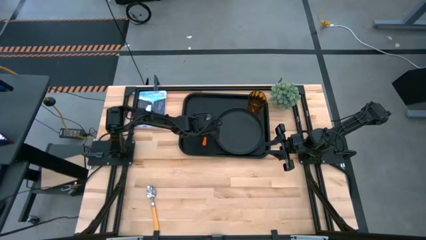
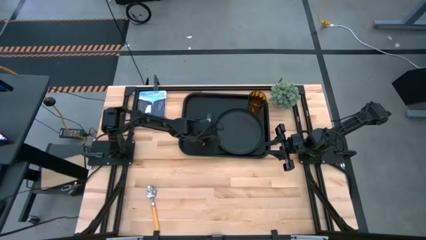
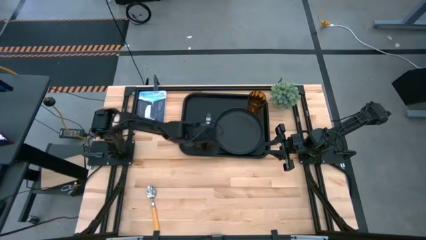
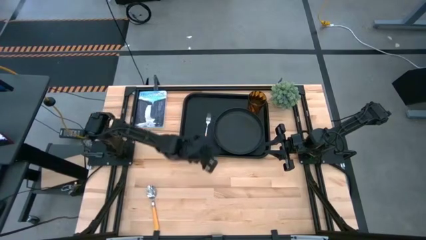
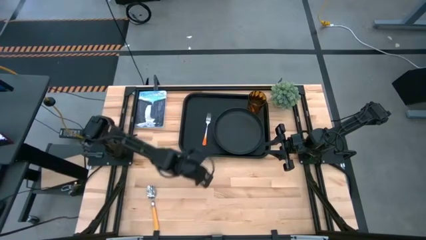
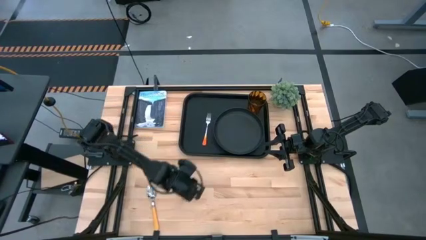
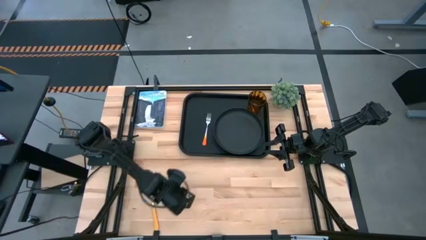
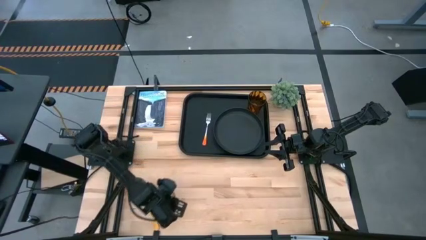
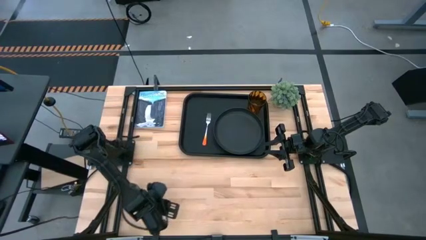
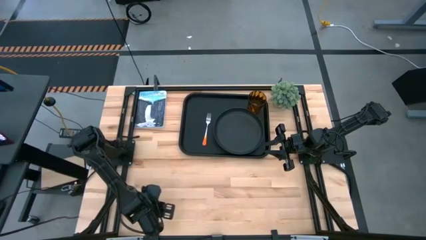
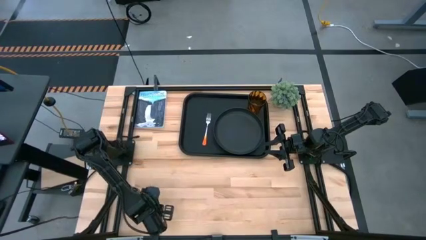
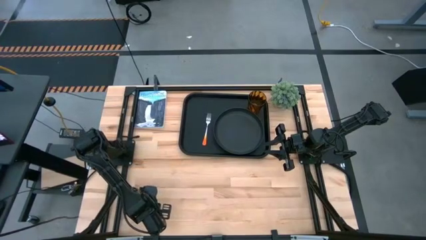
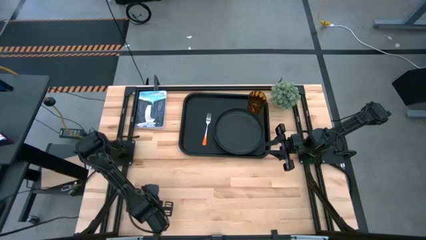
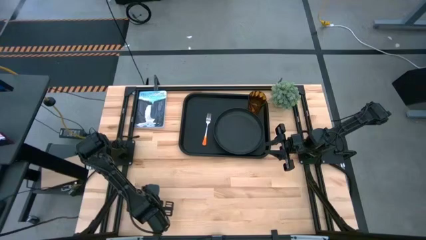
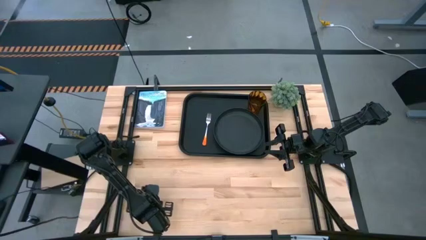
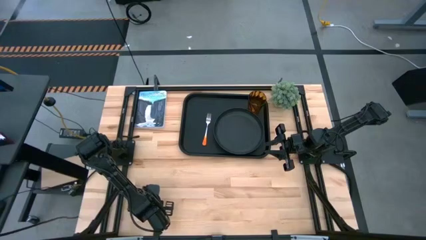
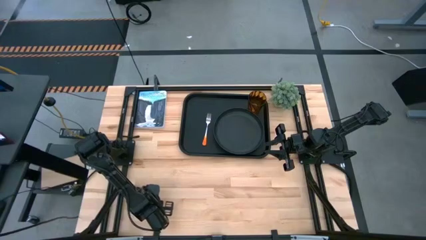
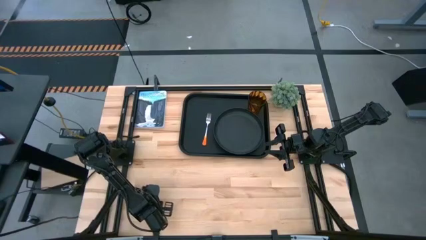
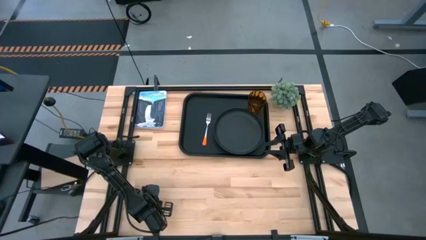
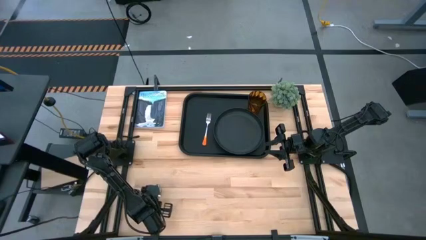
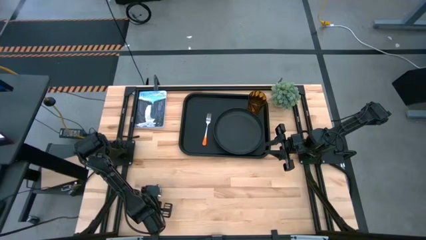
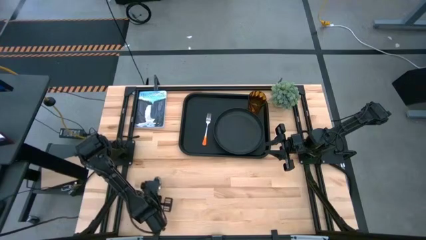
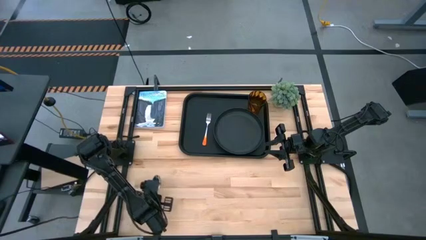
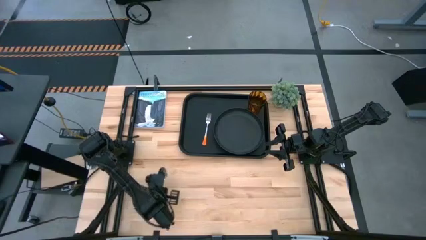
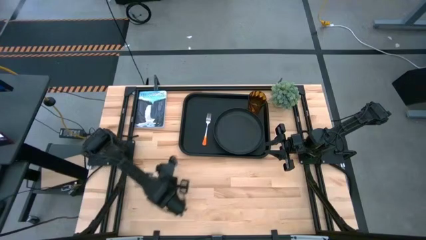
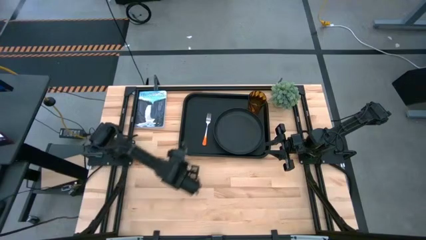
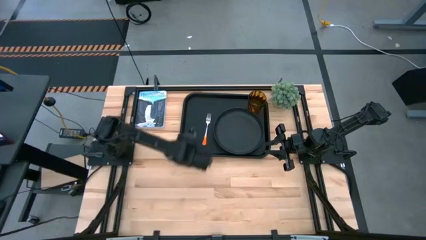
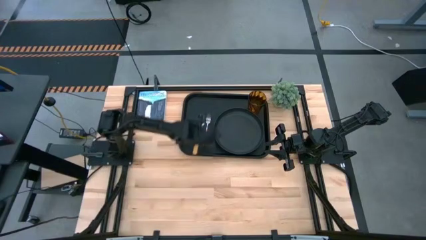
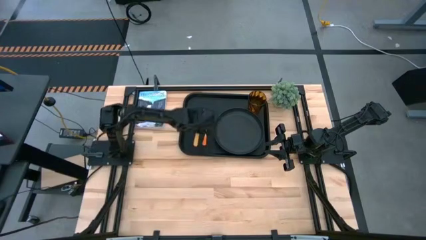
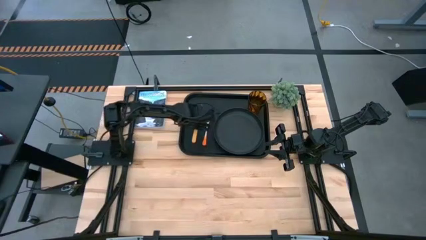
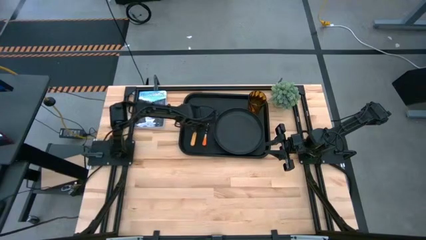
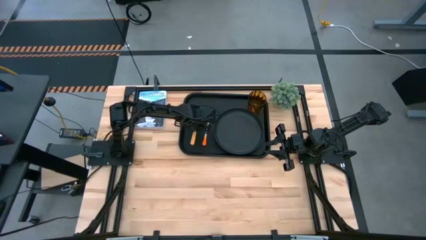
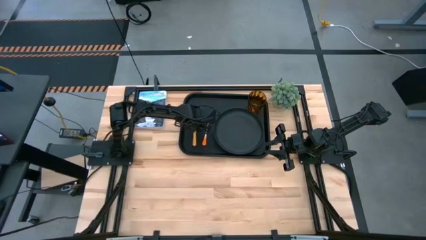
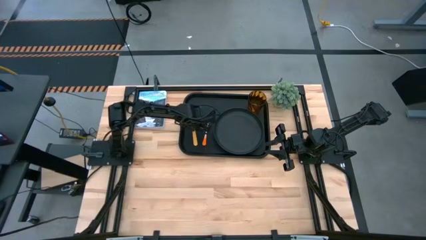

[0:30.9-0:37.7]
Task: Pick and place plate/cup/fork/spoon on tray
Put the spoon to the left of the fork on the black tray

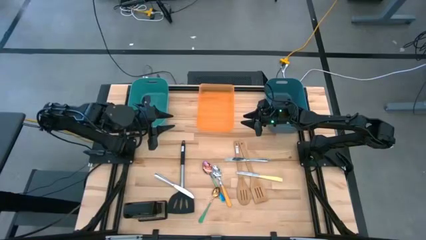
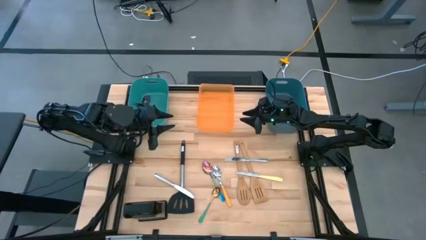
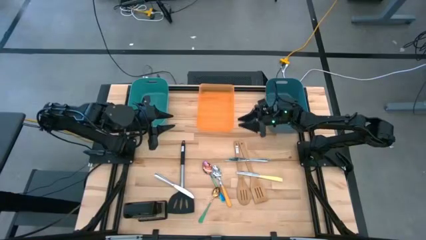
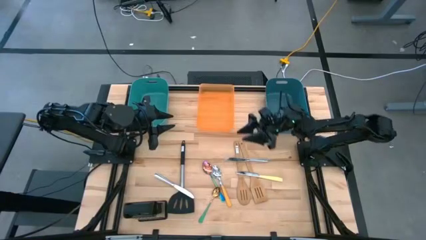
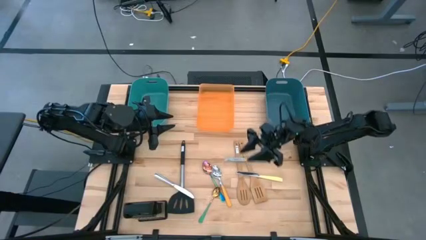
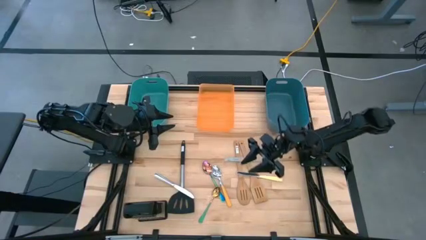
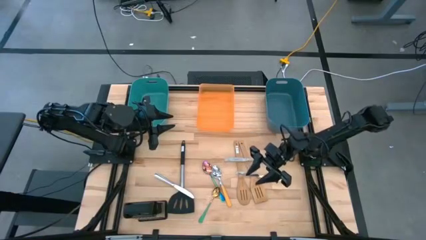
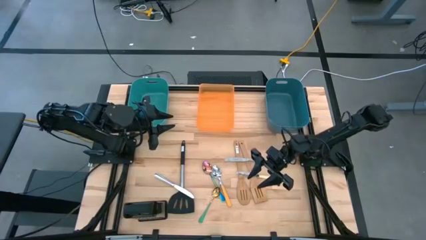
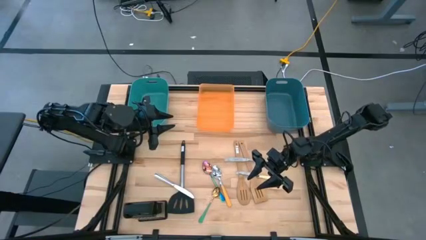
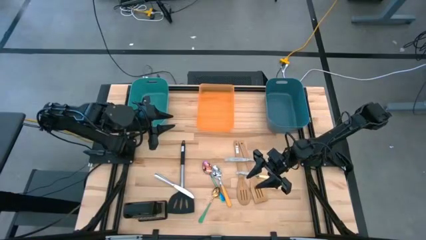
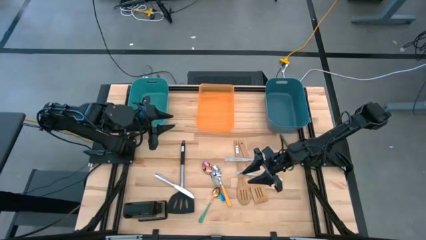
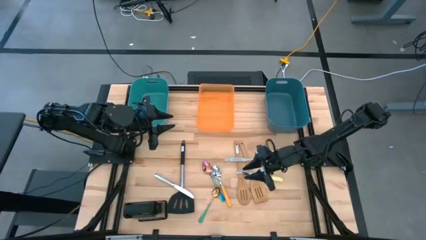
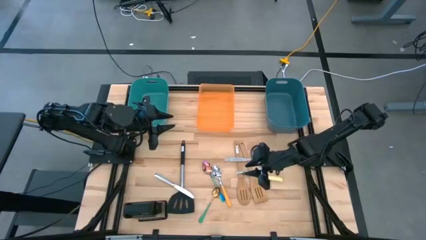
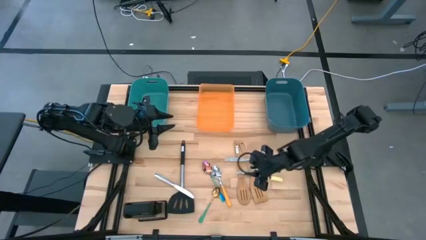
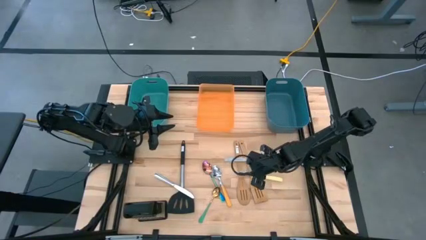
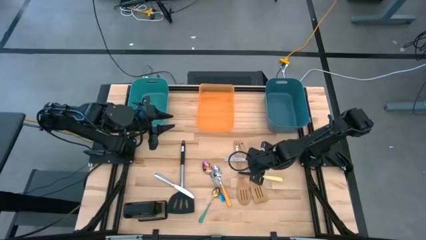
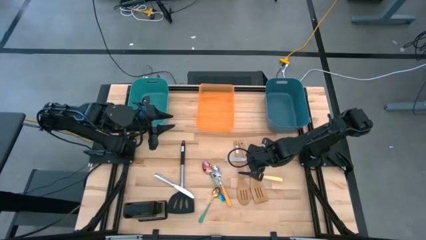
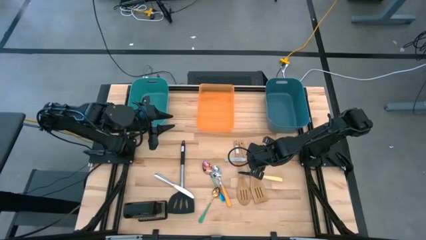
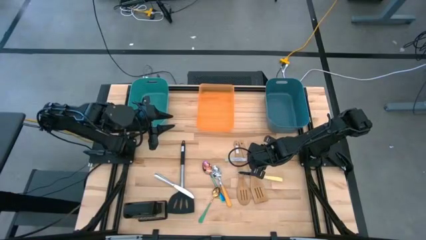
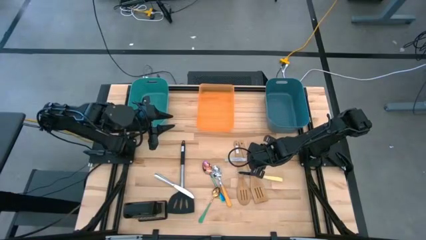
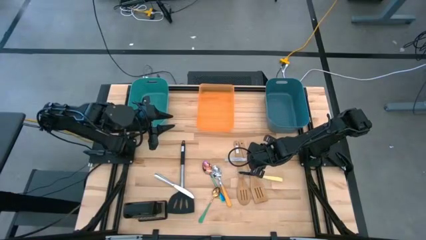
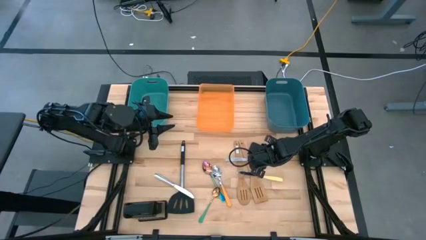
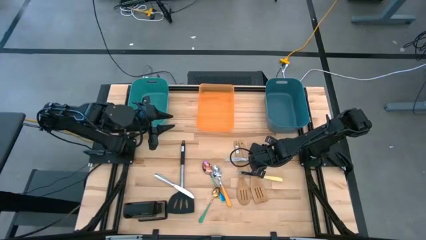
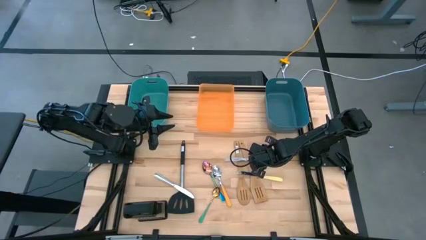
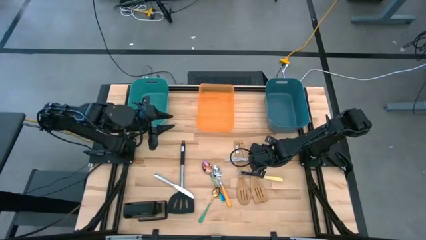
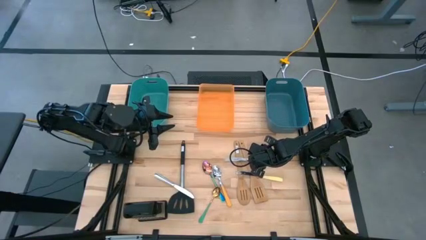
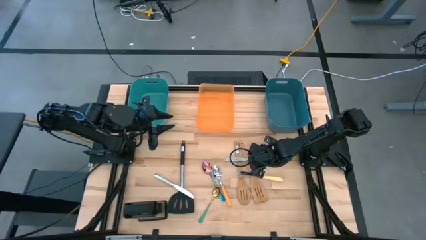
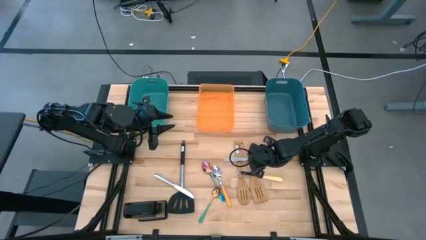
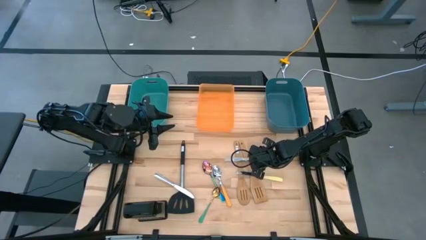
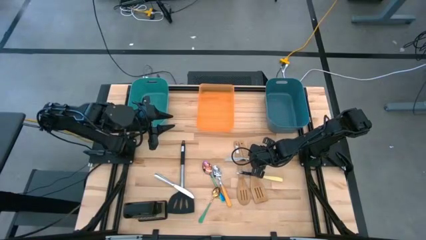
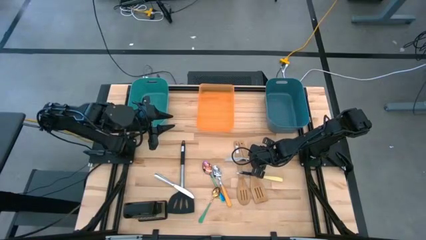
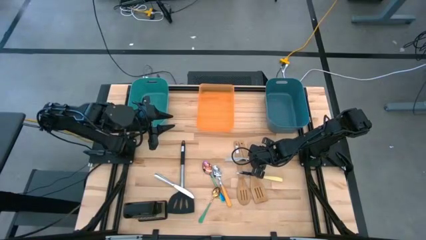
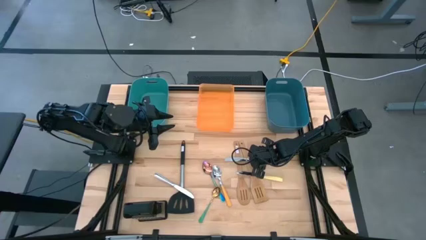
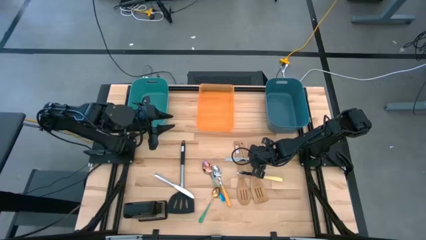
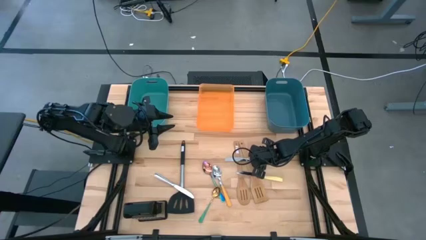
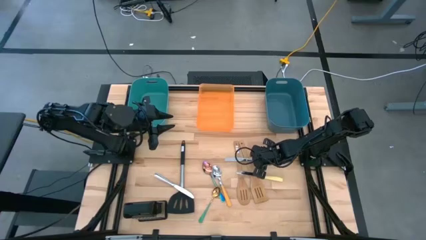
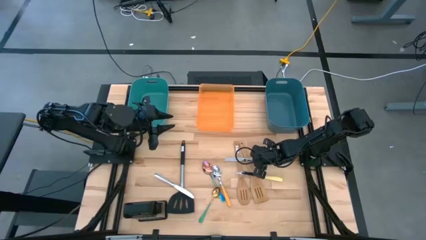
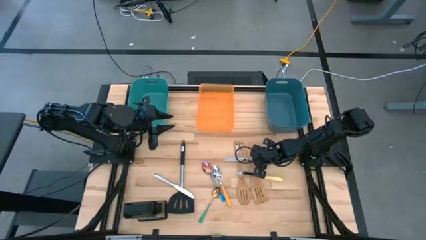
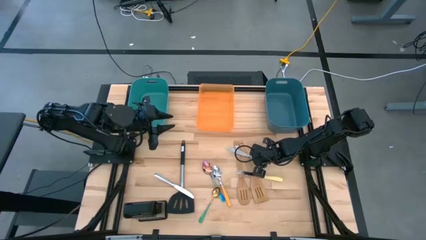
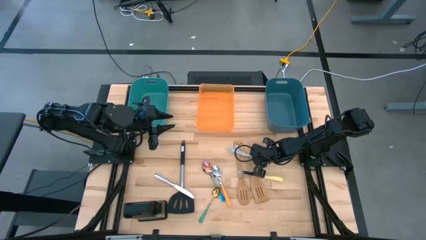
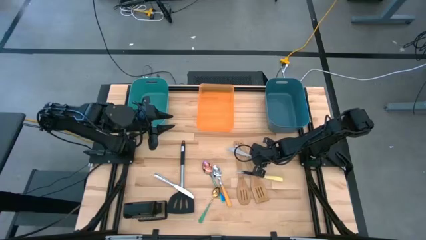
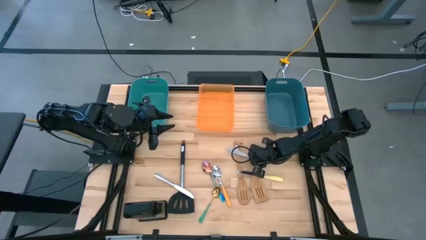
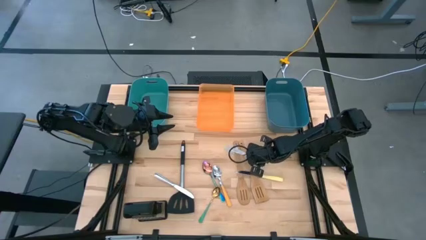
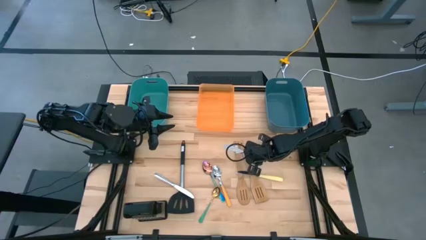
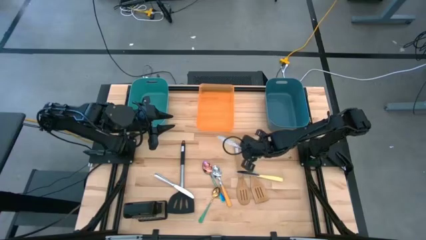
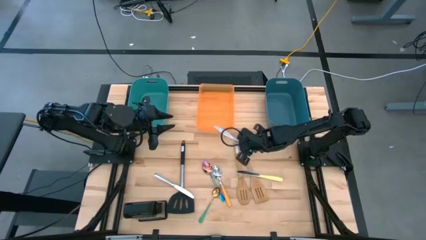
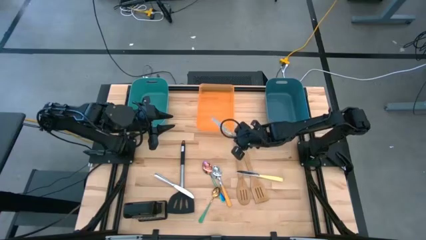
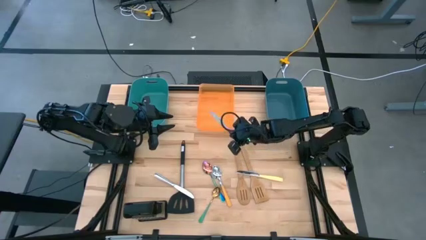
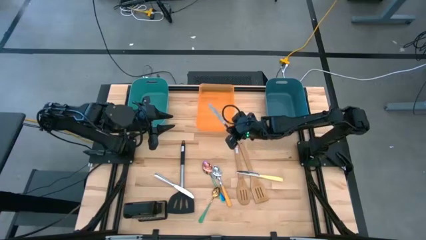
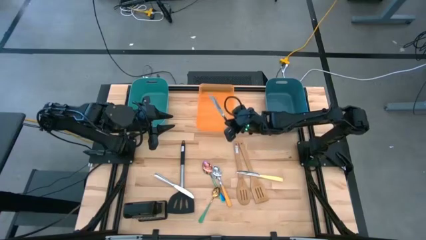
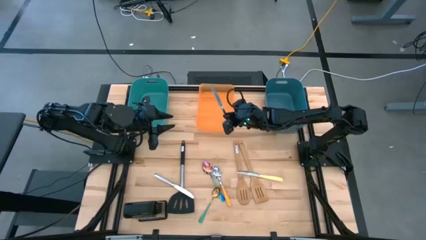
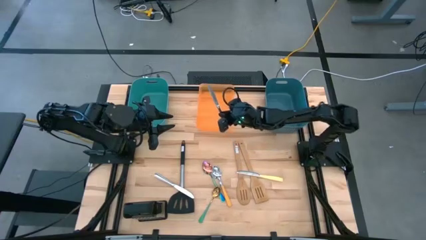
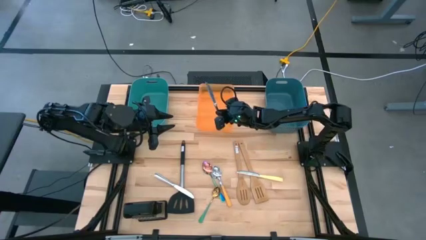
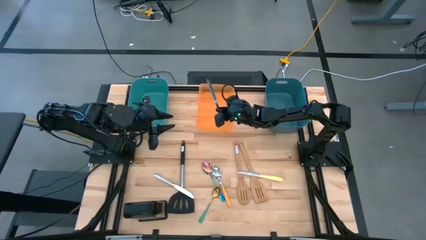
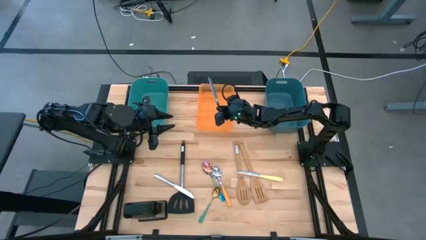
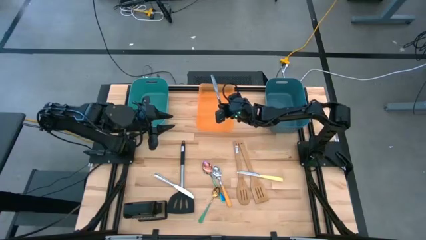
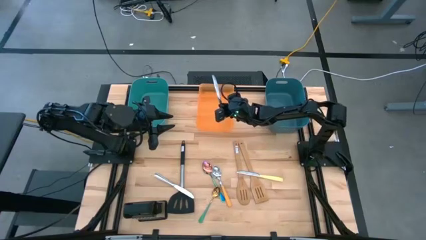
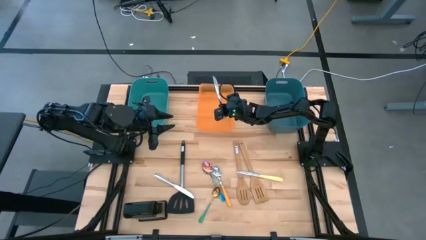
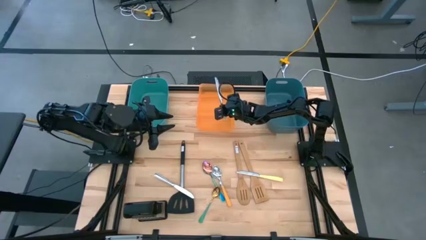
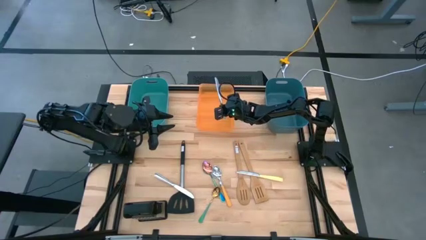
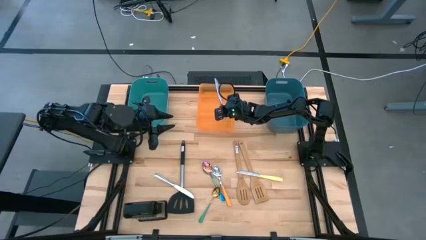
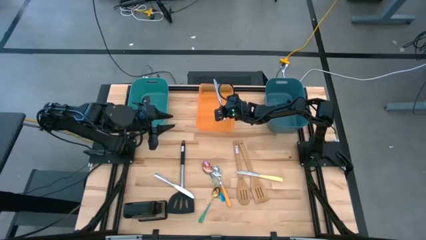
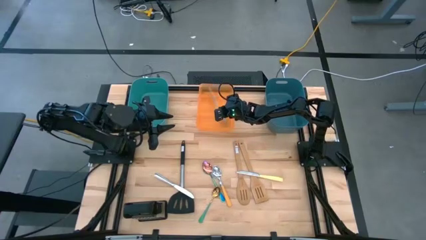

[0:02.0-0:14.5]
Task: Pick & Place Kitchen Items
Put the right silver knife into the orange bin
